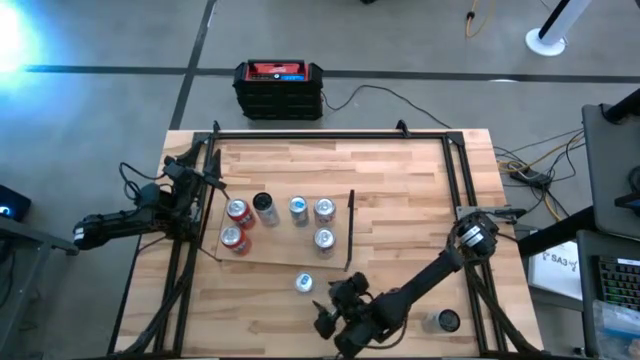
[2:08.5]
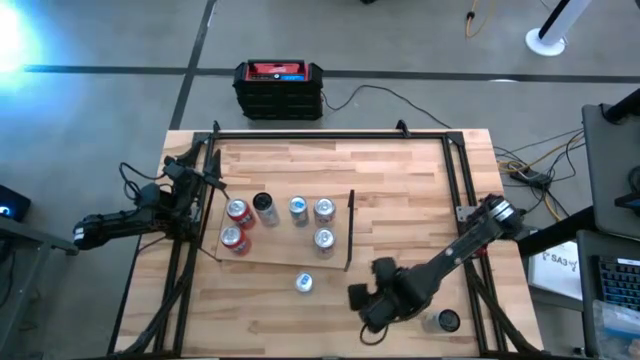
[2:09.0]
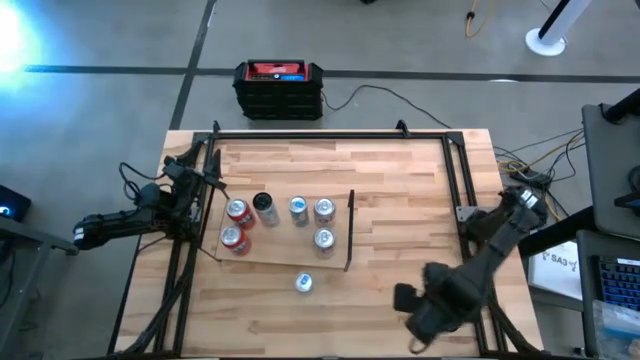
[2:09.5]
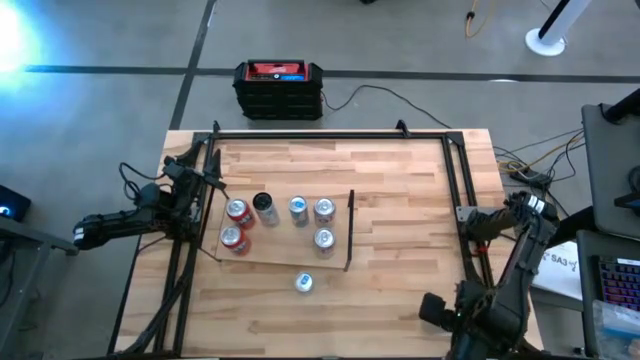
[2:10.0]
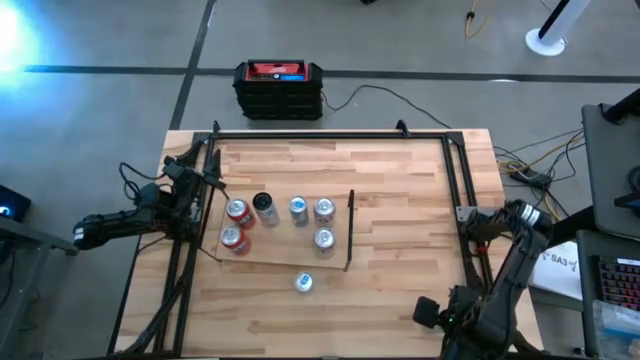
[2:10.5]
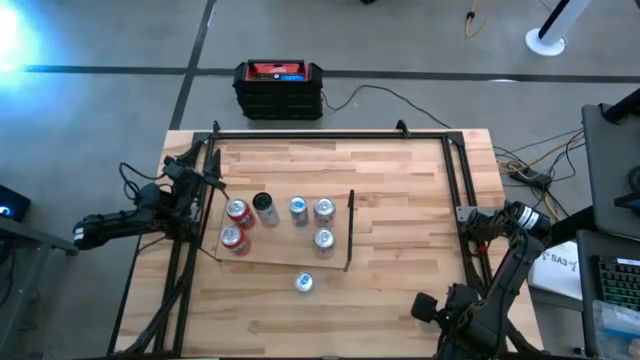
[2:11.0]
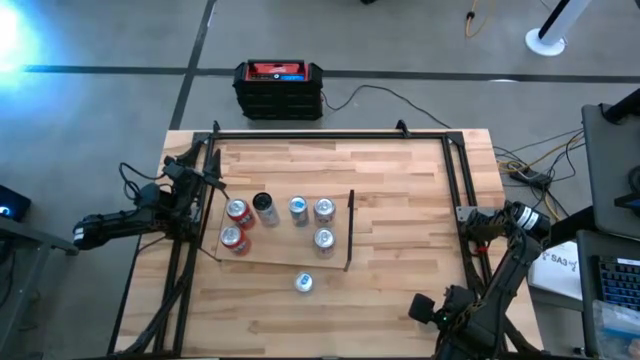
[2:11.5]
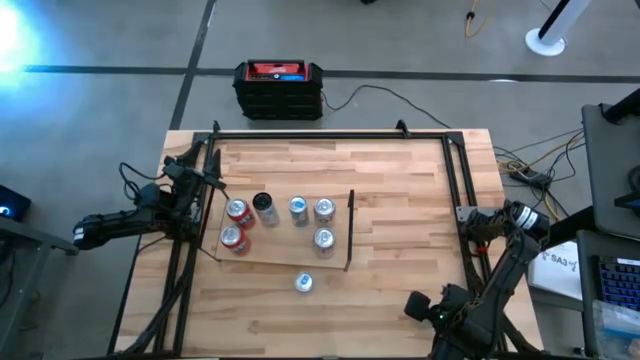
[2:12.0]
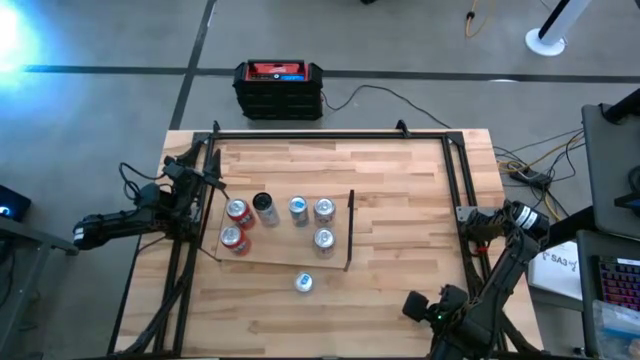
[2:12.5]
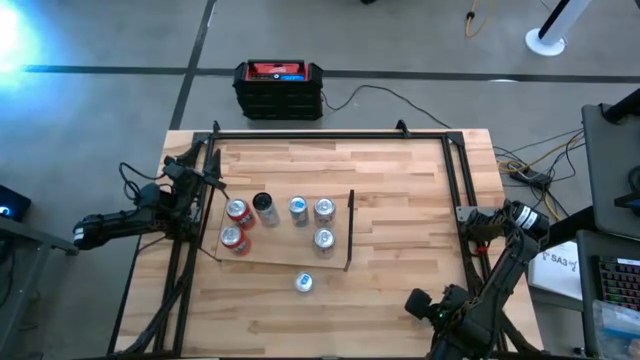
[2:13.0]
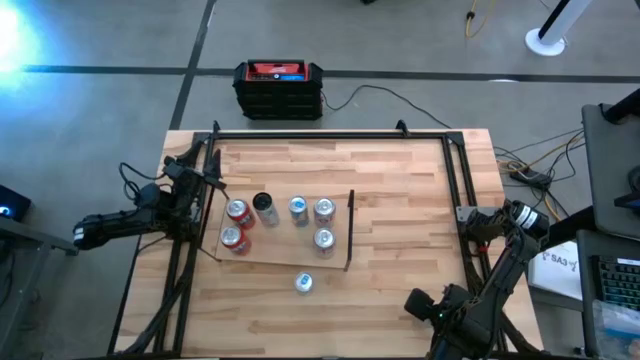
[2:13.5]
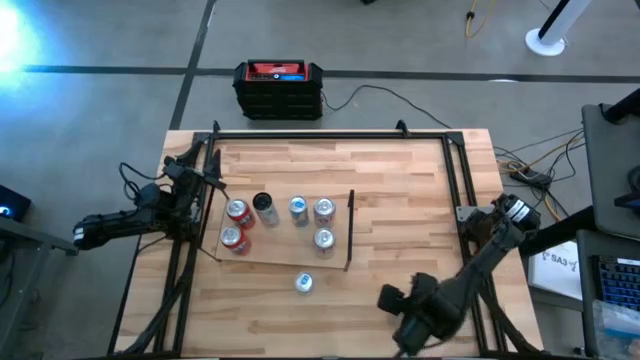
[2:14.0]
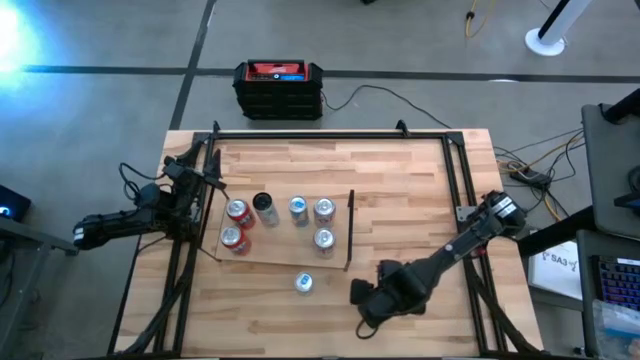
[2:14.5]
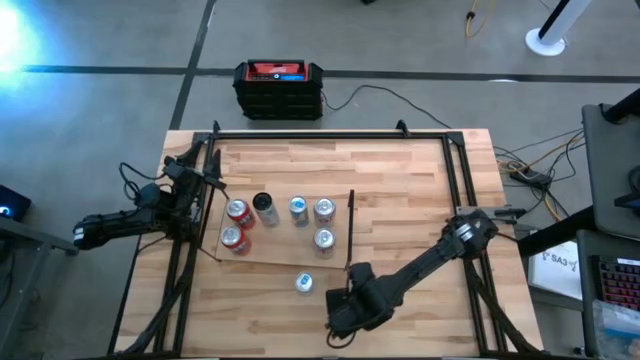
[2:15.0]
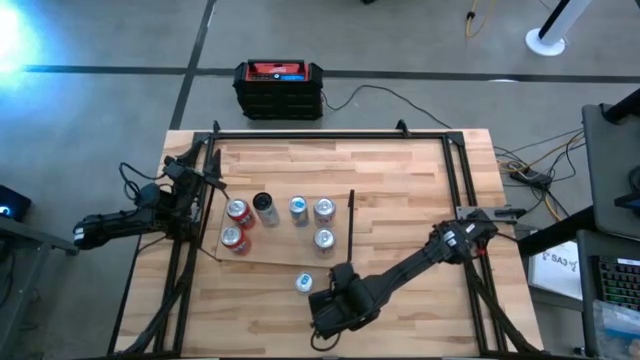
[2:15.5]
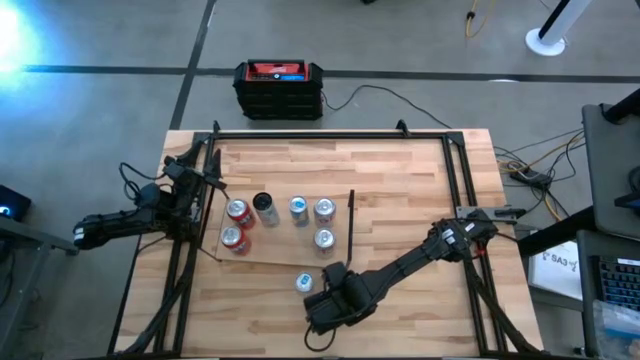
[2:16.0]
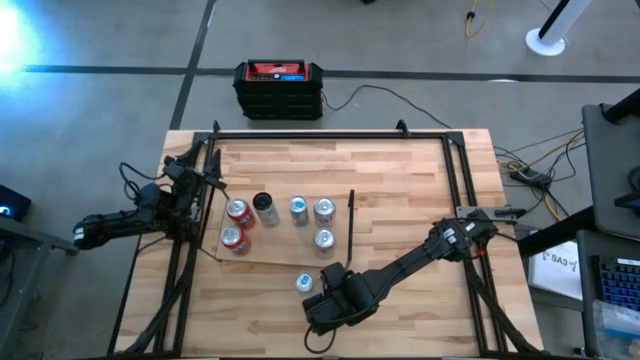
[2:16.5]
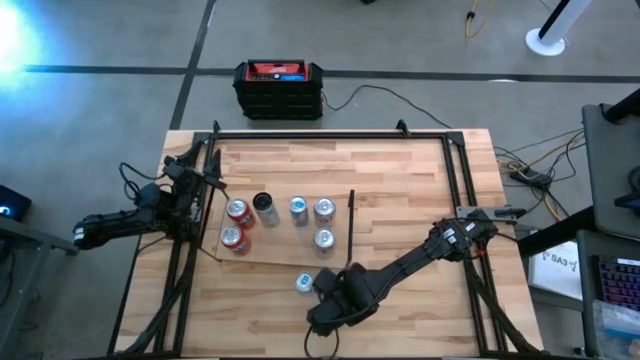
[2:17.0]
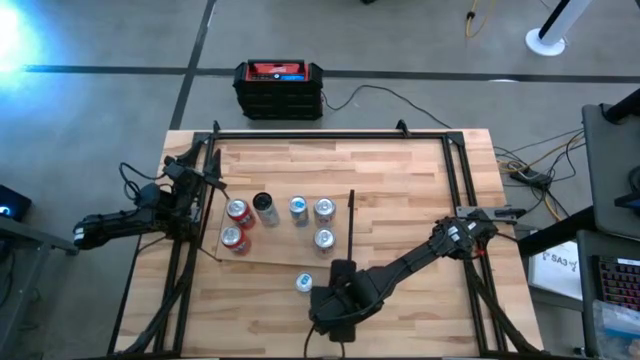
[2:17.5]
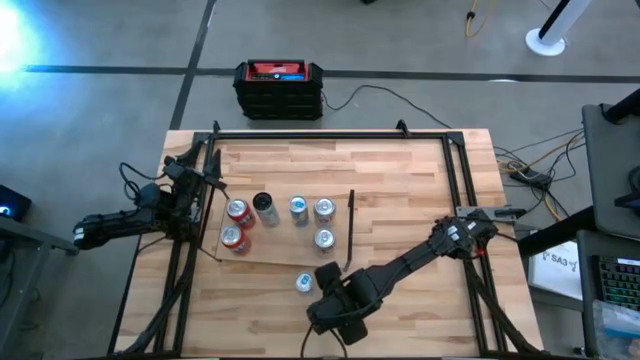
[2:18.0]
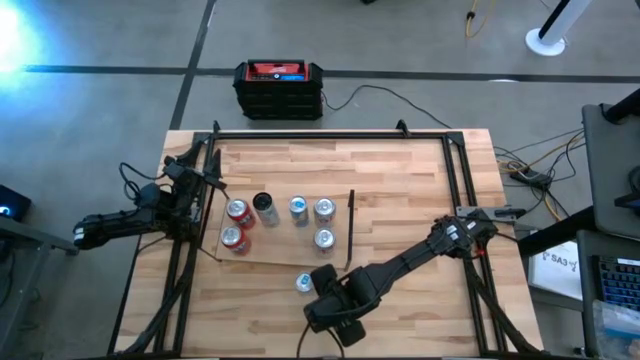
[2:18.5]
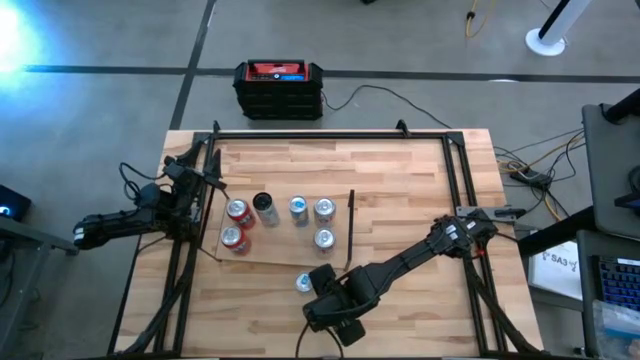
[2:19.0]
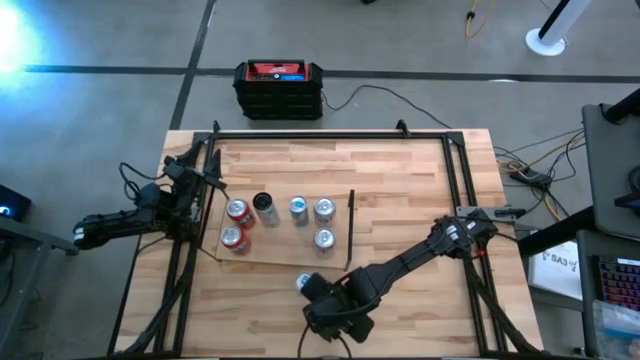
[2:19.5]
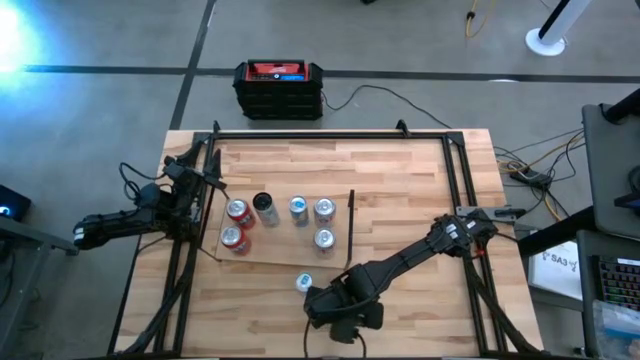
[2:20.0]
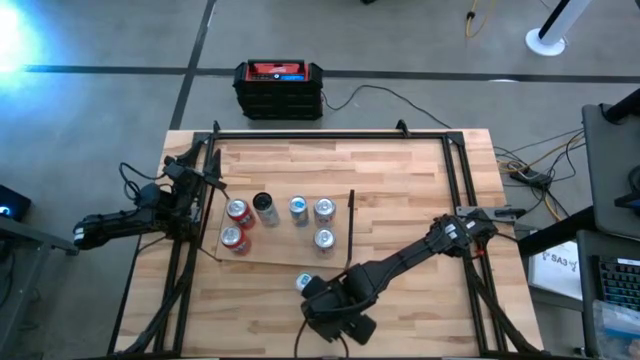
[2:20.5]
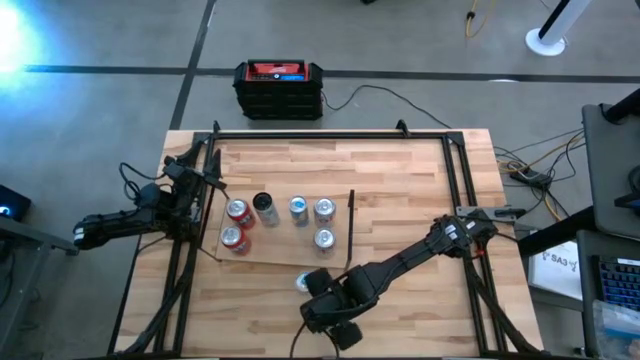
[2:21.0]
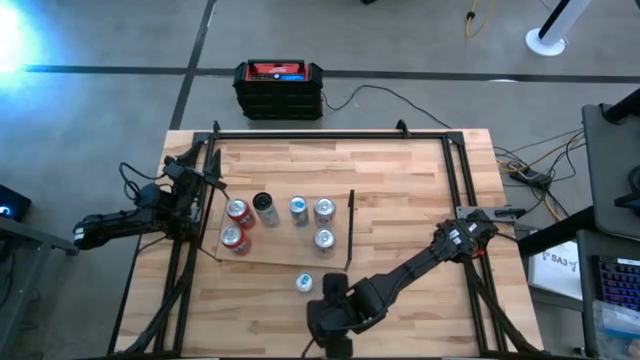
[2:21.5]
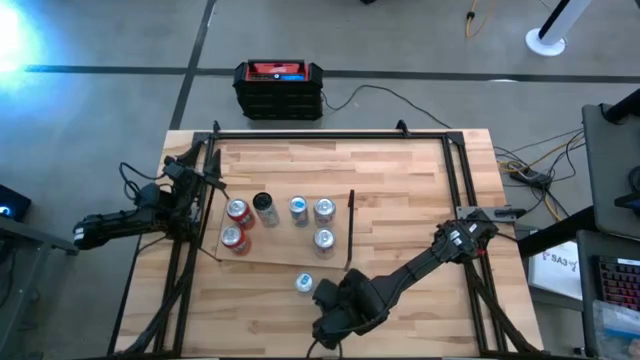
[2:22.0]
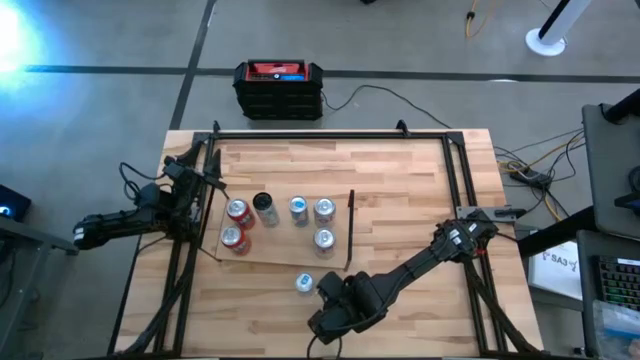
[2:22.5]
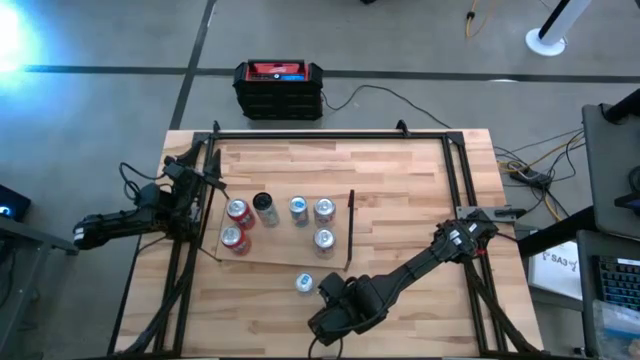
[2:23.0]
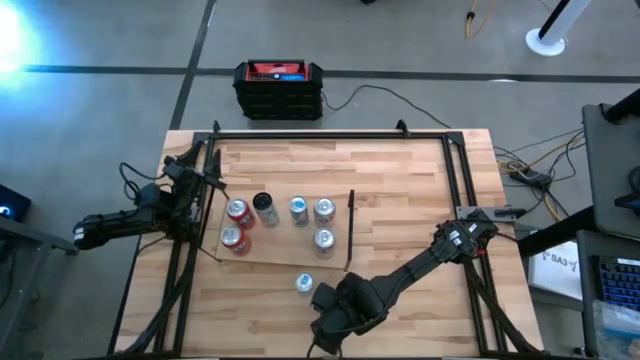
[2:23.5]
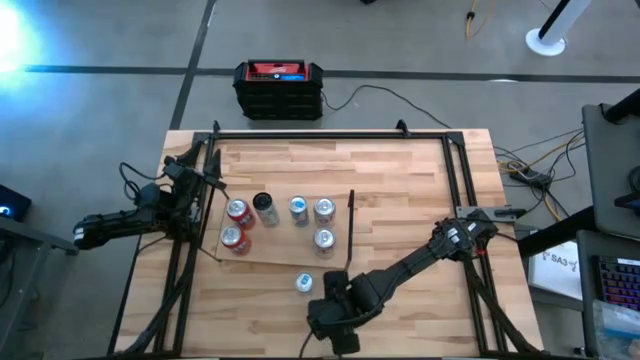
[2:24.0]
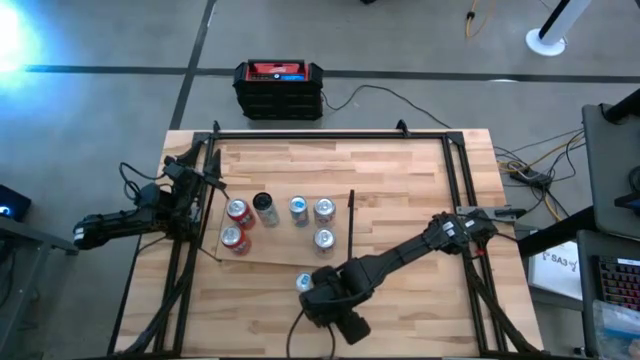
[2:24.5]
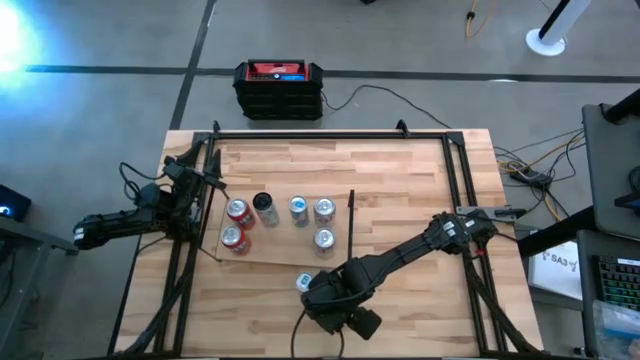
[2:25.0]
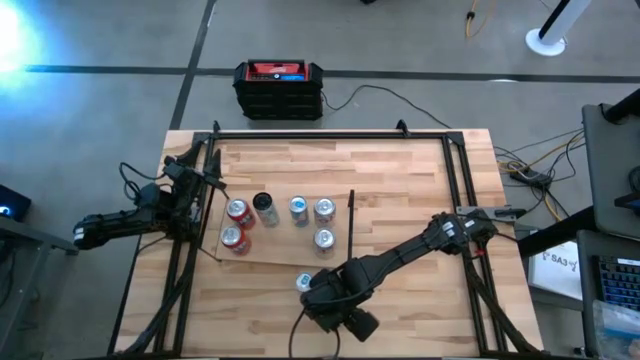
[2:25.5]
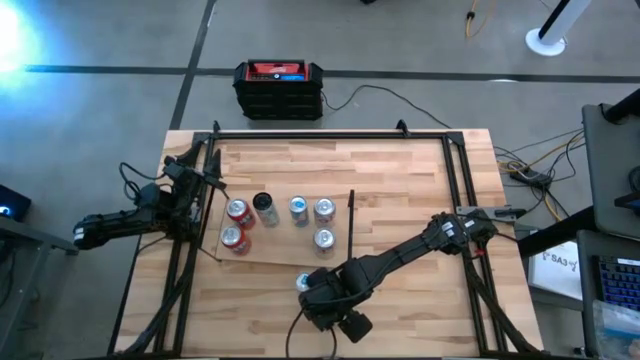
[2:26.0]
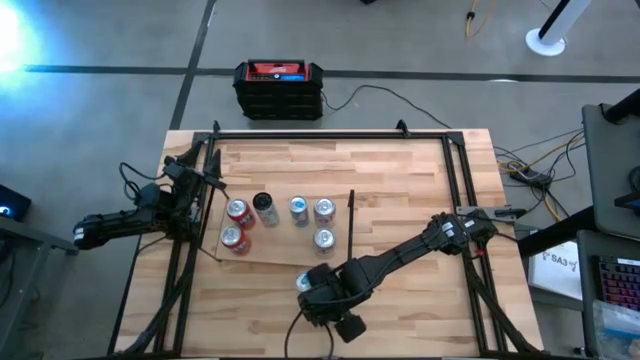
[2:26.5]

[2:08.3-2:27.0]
Task: Place canned beverage on shelf
Move the white pink soda can to the bottom middle of the table

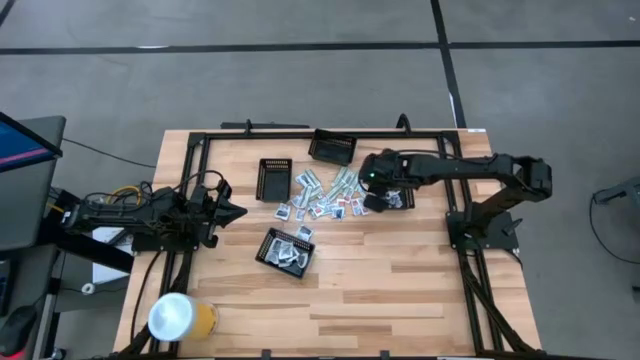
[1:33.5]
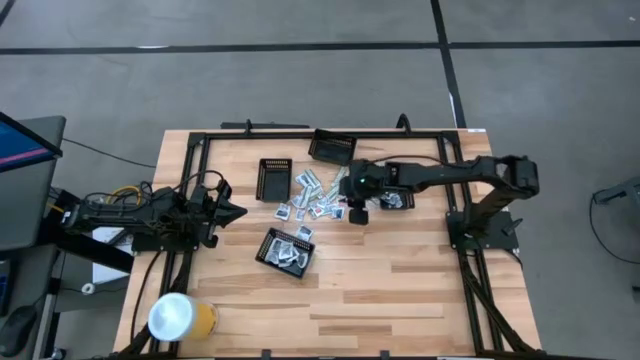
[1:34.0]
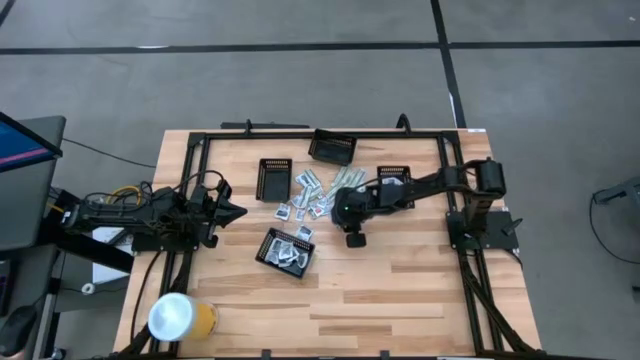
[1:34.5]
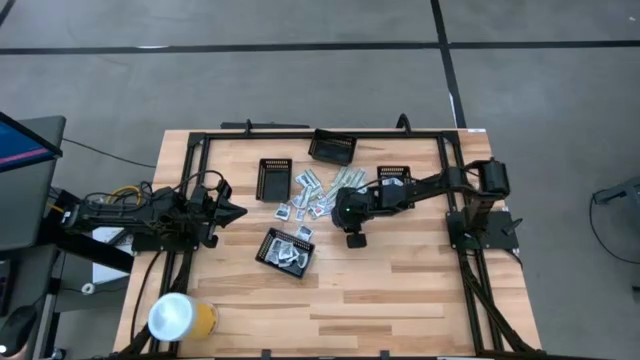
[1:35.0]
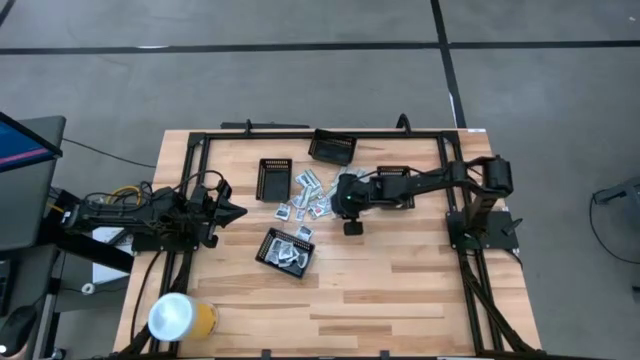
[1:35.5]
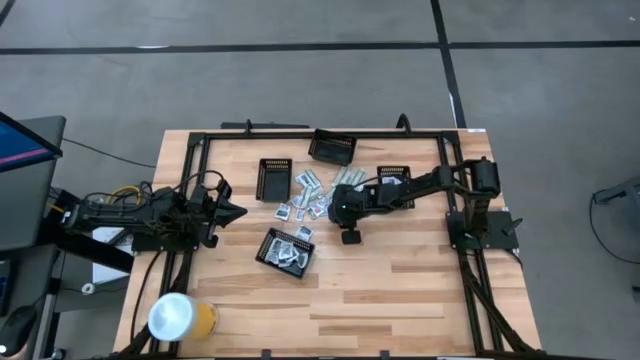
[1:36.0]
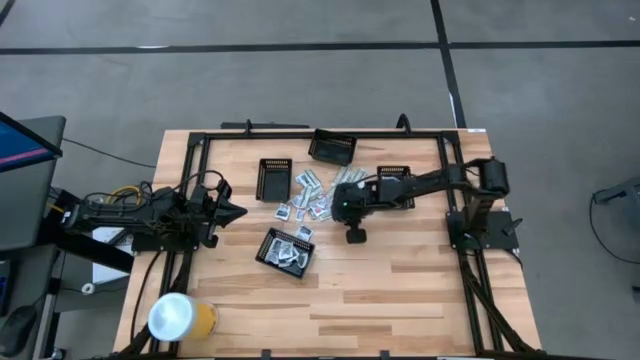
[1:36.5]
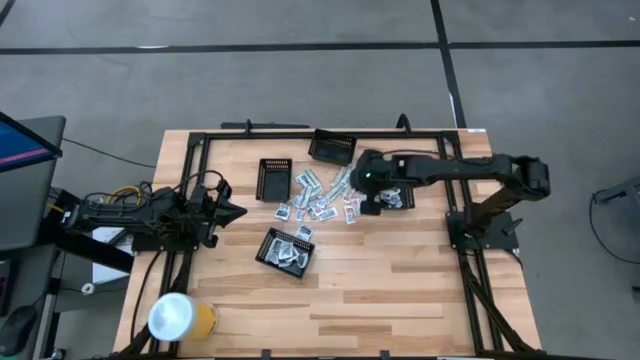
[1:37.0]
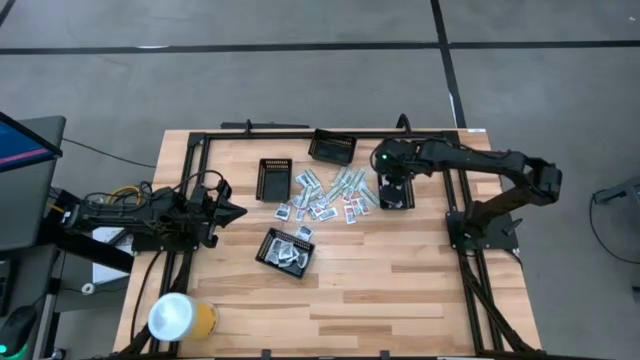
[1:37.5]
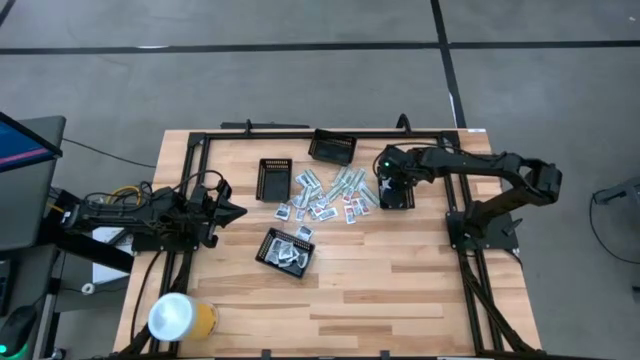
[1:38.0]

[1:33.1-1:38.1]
Task: Pick & Place First Aid Supplies
Put the white alcohol pad into the right black bin
